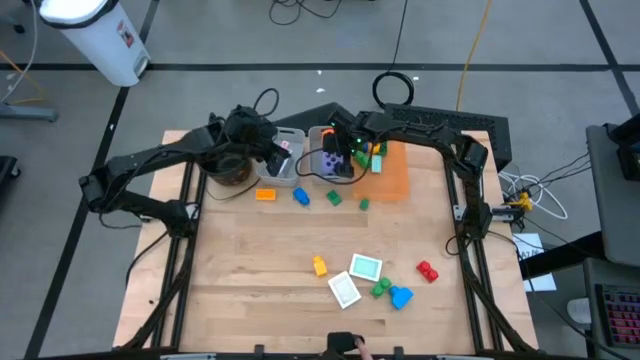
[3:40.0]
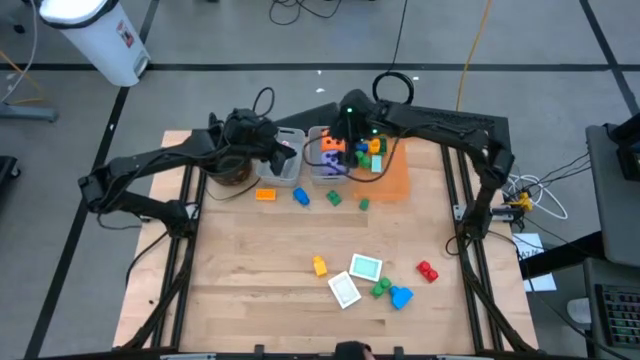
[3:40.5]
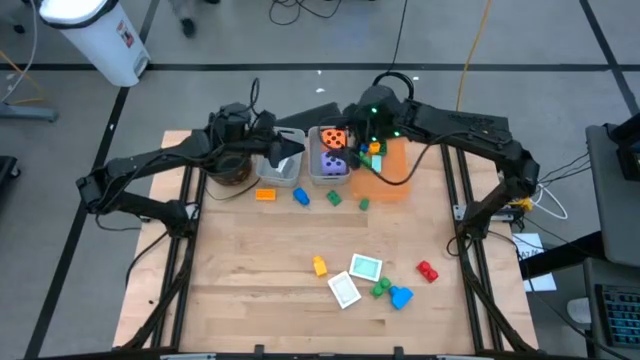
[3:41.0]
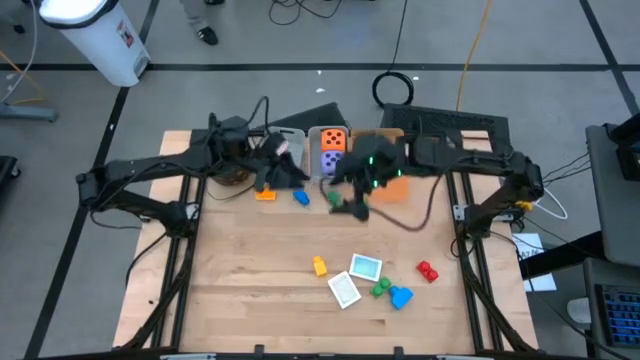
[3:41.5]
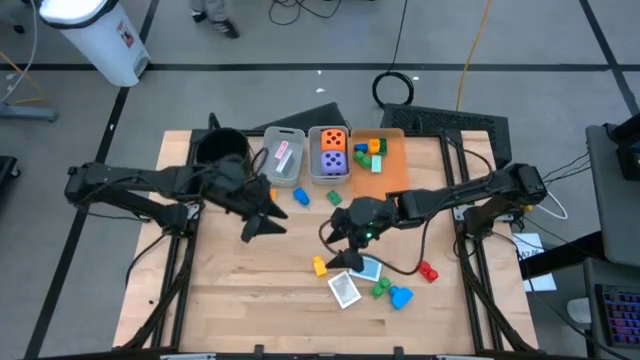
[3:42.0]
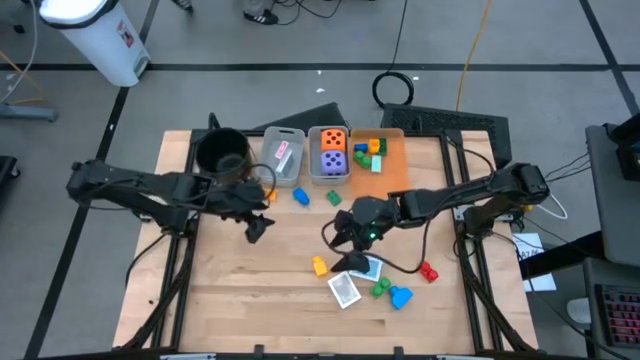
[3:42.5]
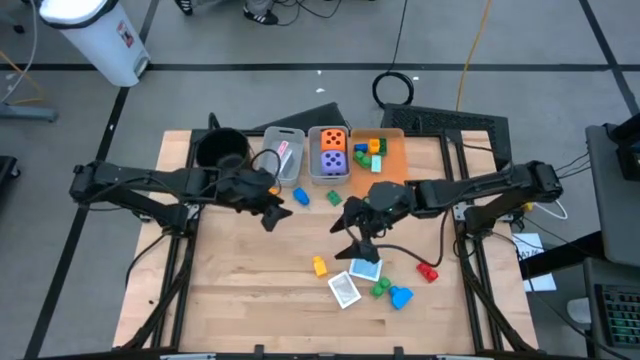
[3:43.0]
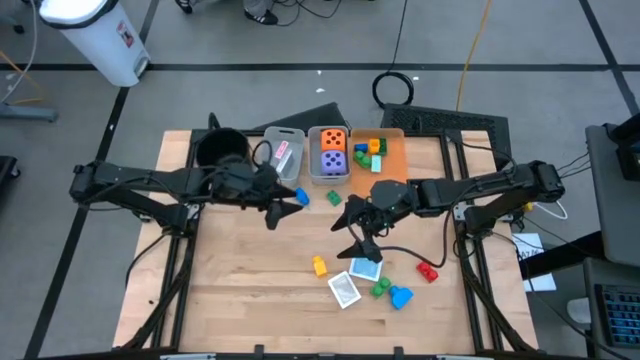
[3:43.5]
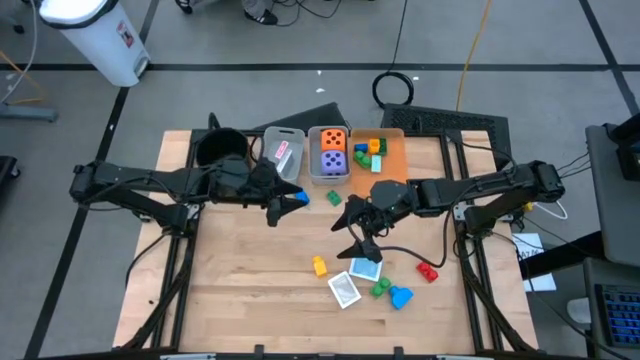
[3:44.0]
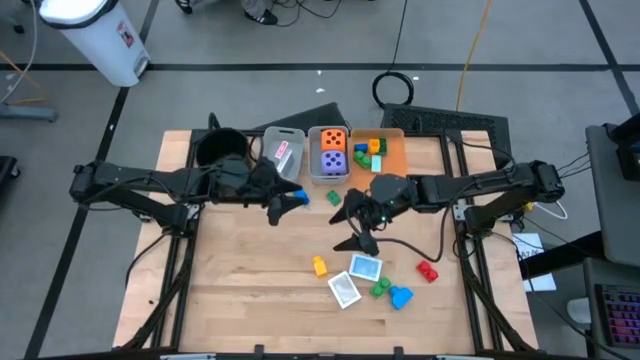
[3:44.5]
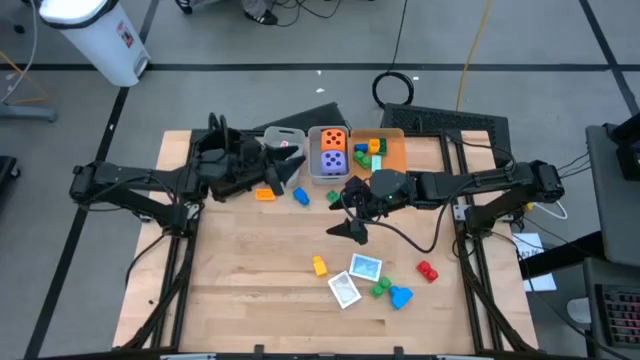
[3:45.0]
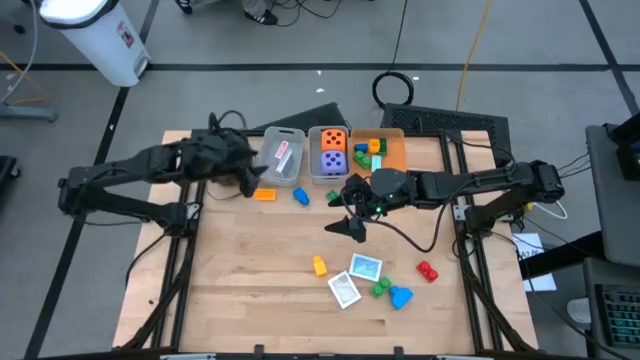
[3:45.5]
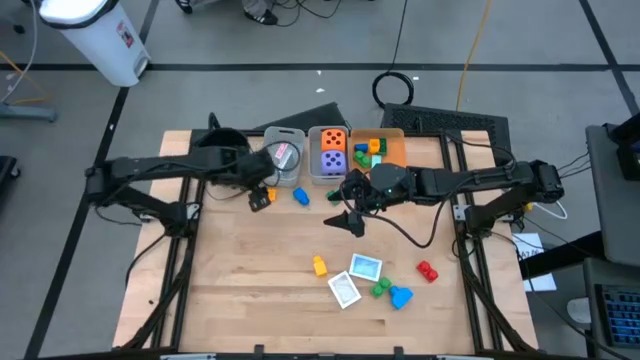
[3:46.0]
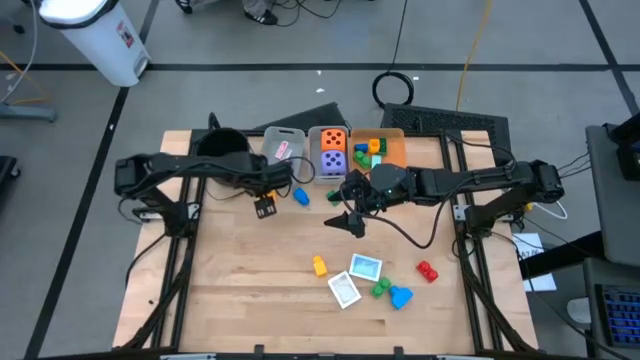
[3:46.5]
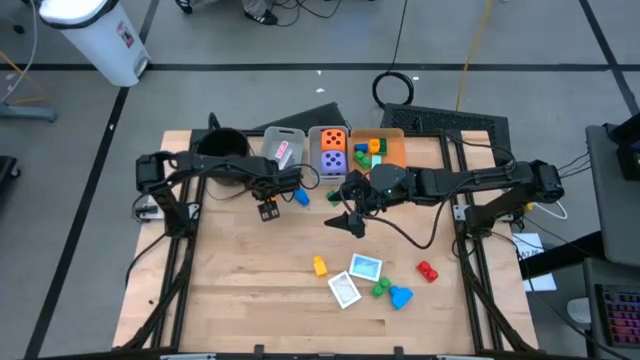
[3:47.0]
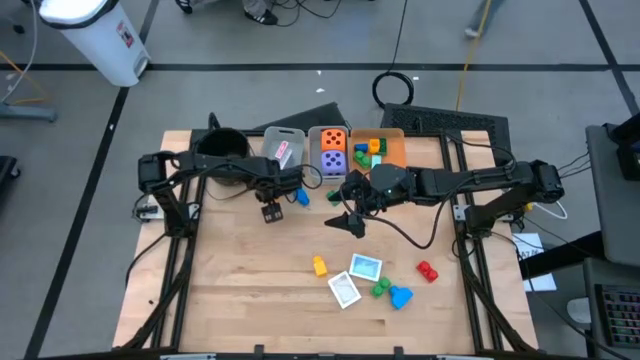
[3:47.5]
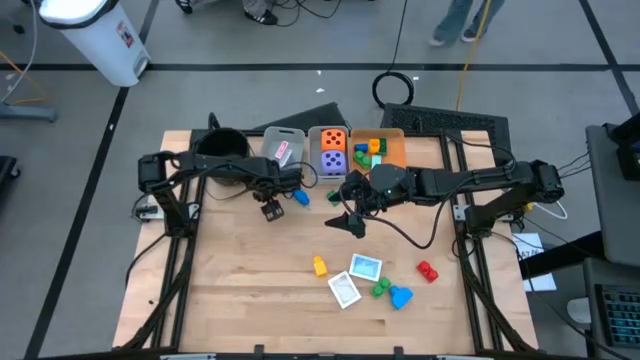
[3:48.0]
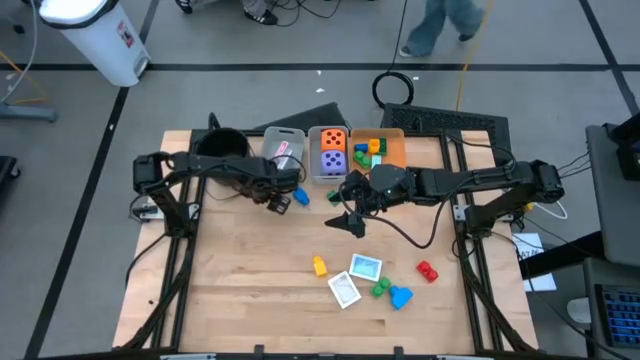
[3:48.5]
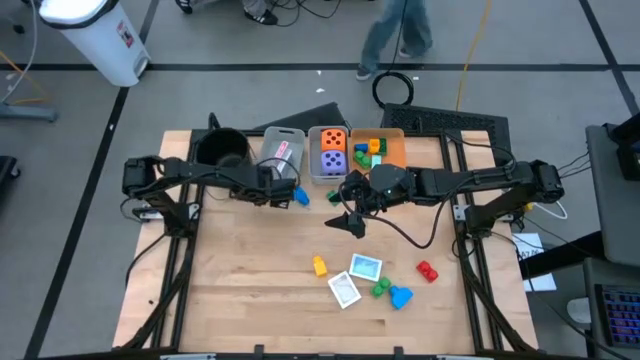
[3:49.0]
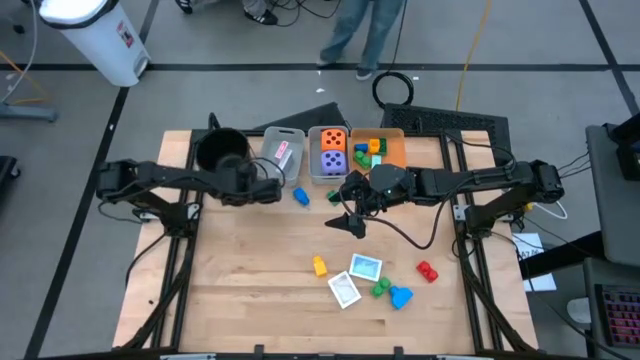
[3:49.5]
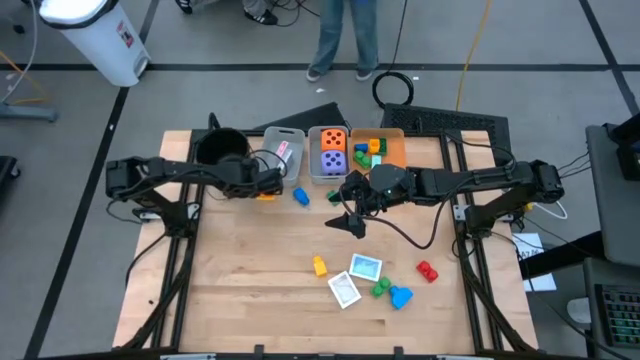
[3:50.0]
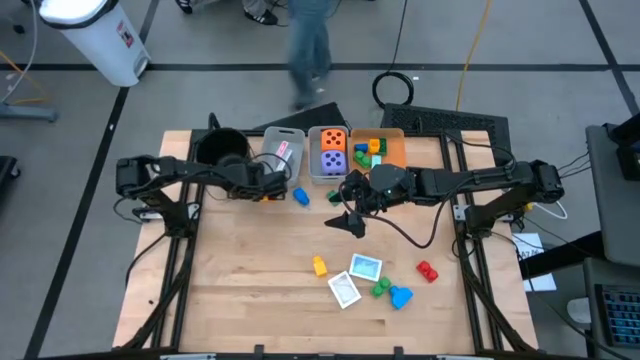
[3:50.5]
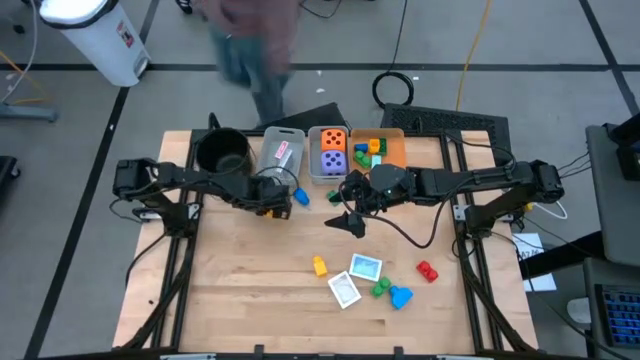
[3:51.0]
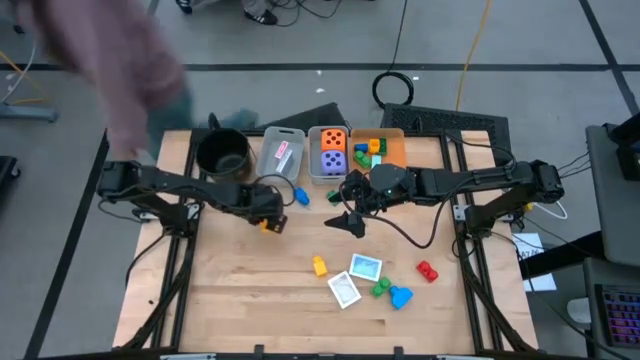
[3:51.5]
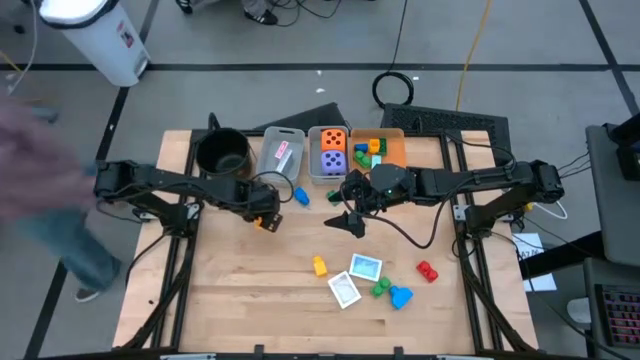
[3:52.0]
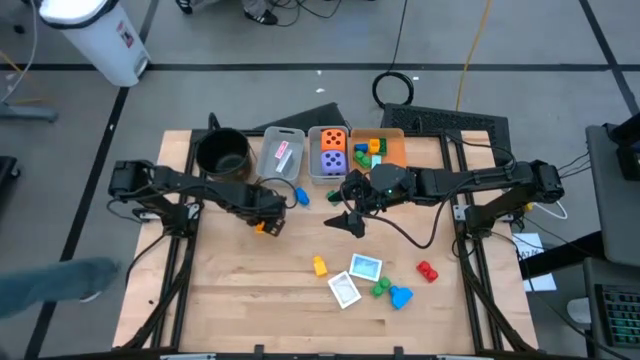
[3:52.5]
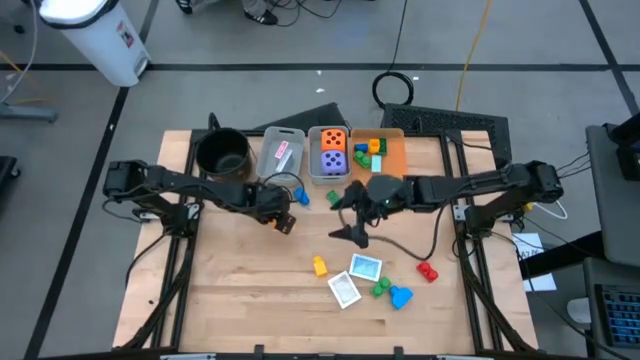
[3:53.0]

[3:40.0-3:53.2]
Task: Pick & Place Toys
Put the top yellow game piece into the orange bin
